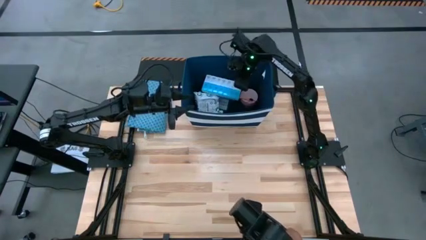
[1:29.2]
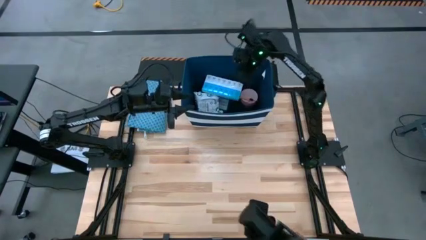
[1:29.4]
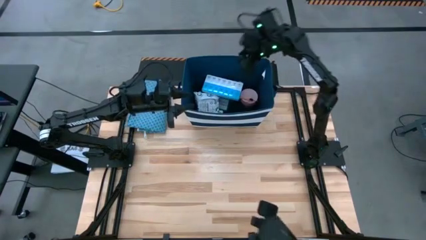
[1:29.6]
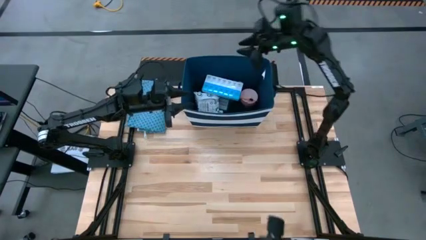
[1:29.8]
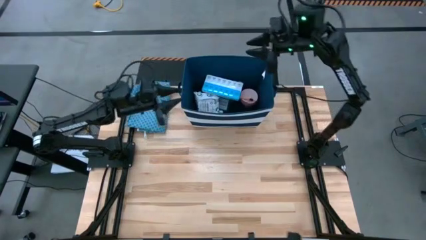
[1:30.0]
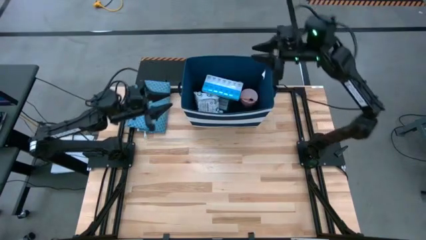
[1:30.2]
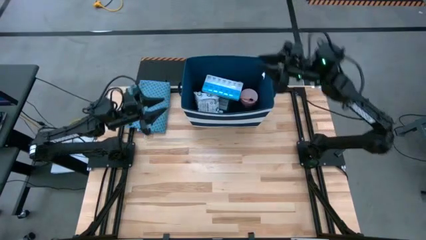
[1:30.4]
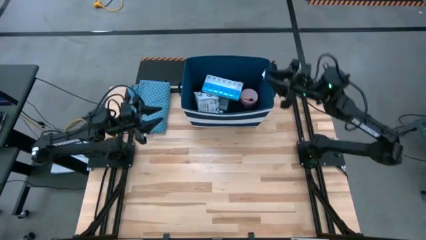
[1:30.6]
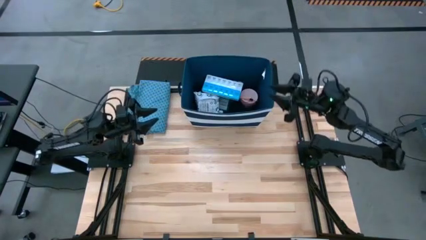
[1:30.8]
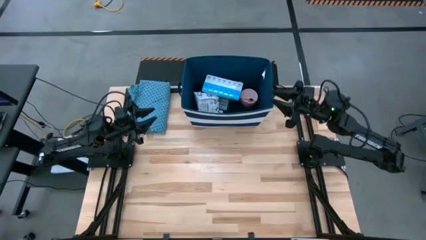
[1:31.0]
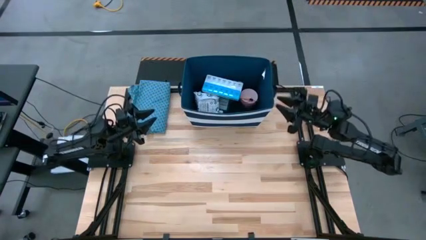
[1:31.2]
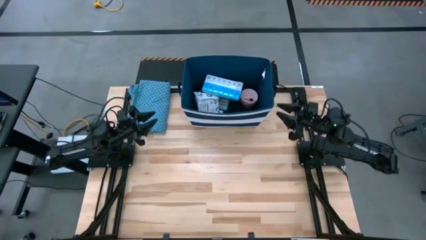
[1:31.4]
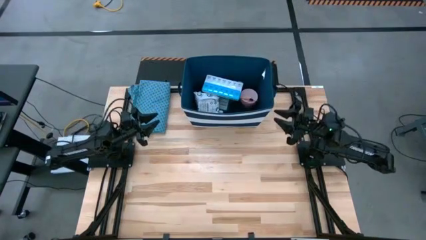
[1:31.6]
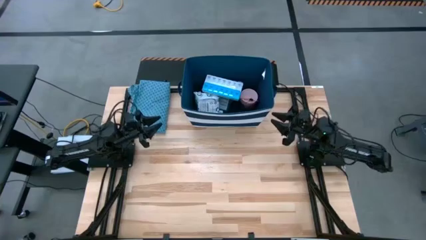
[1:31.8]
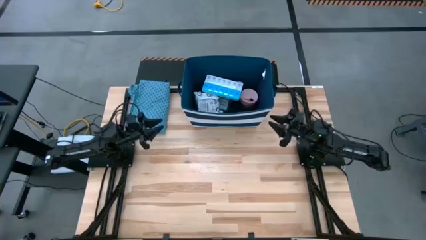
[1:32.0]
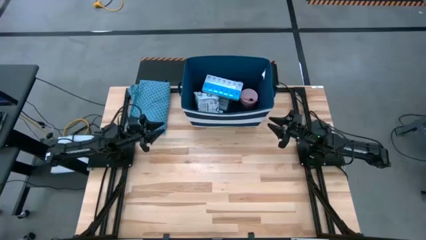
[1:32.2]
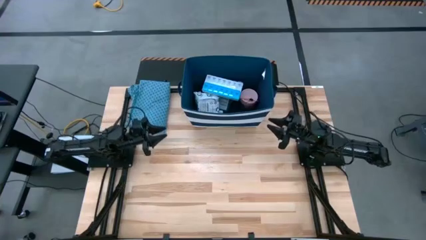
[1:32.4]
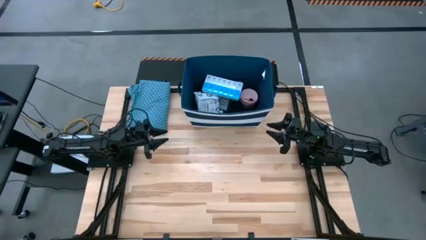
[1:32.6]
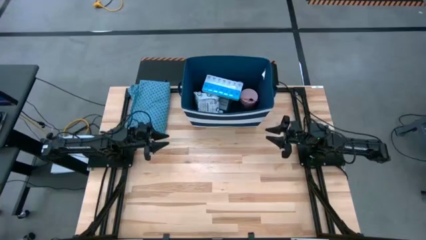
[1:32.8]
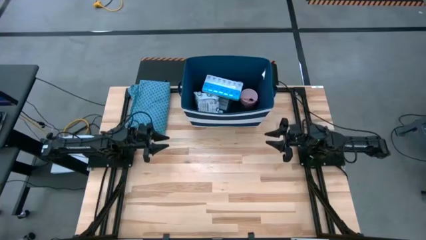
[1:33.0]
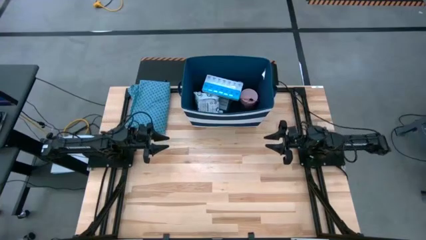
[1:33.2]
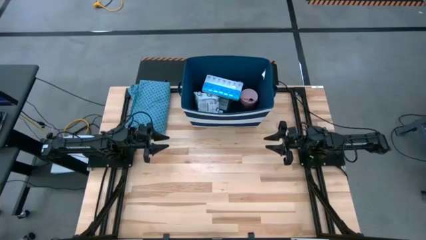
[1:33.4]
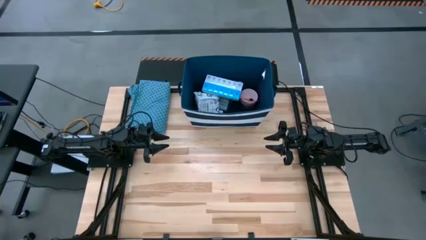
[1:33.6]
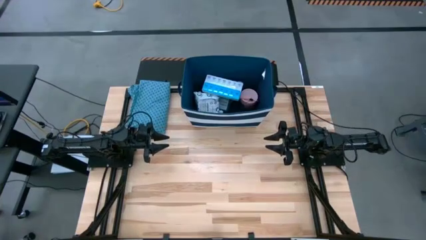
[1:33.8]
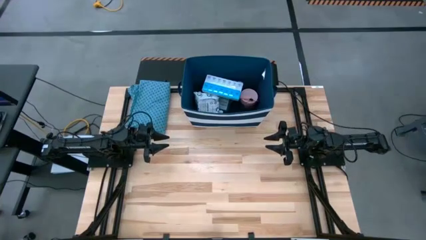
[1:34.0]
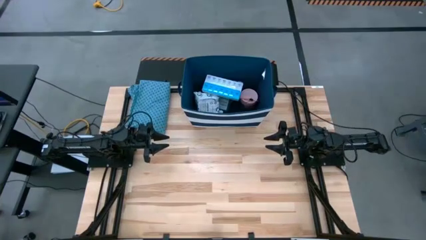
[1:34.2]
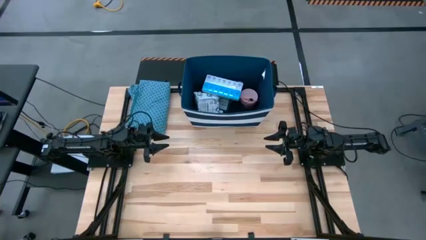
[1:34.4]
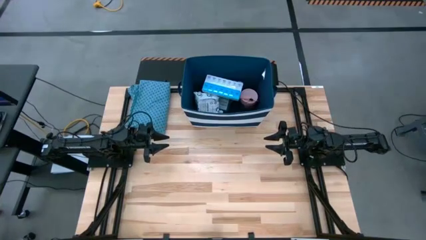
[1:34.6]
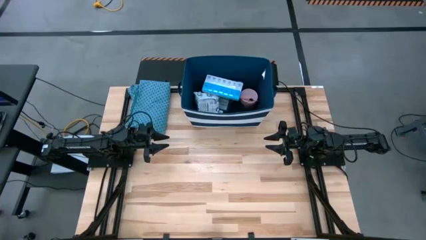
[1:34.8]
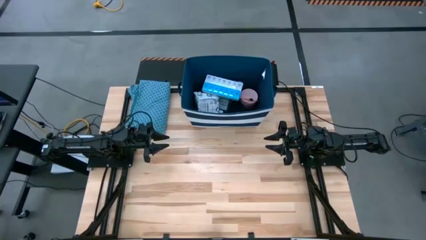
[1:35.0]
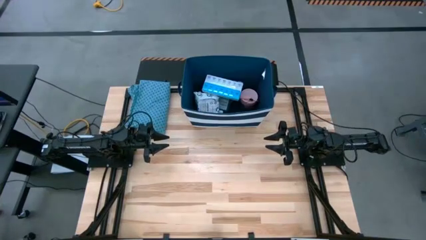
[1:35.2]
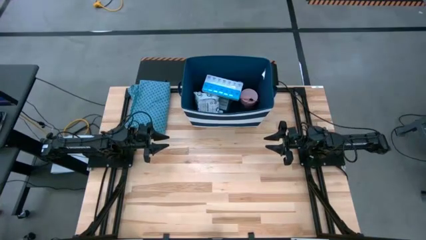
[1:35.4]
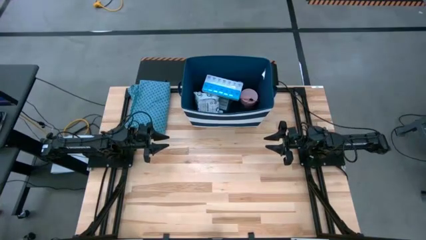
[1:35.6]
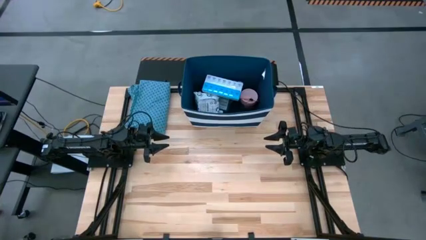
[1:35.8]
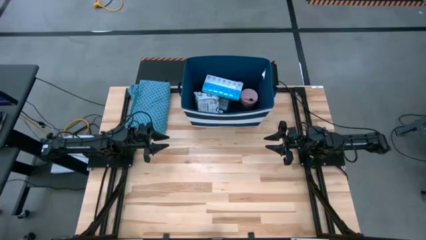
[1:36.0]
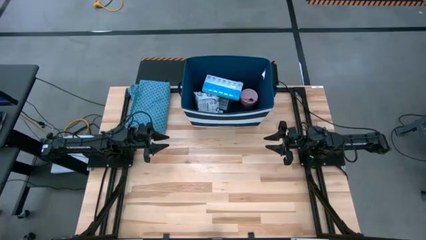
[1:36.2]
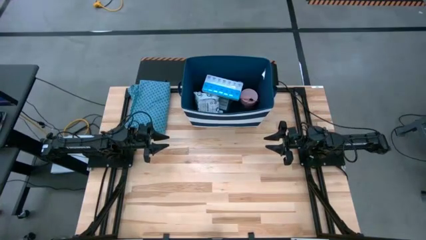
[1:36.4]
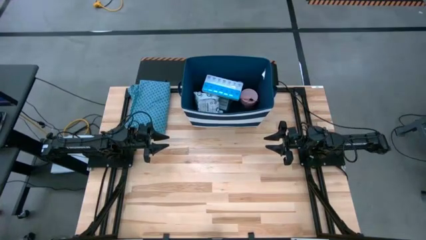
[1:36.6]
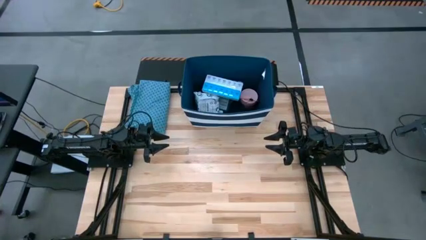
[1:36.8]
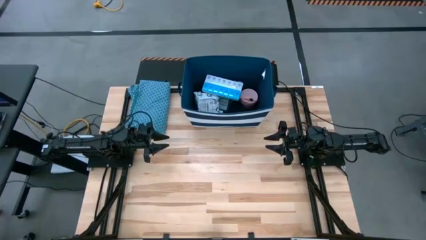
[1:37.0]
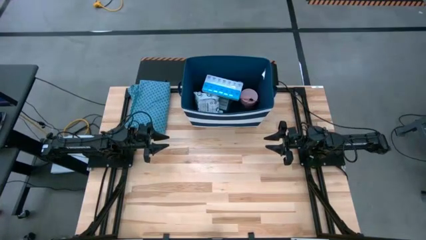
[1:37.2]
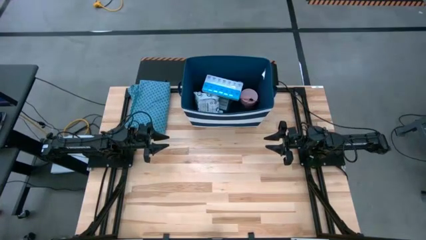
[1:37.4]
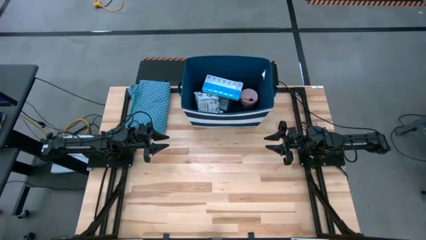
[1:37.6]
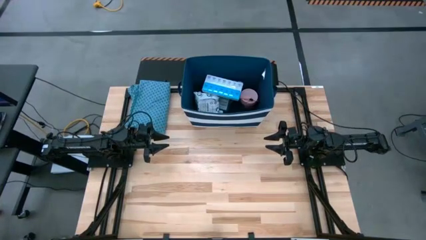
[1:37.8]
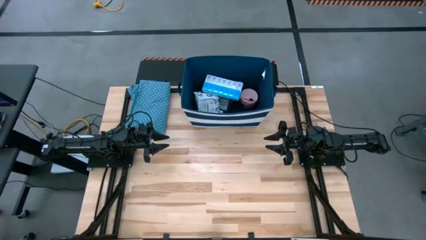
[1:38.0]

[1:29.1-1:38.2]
Task: Pick & place medical supplies in basket/bin
Return to Home Position
